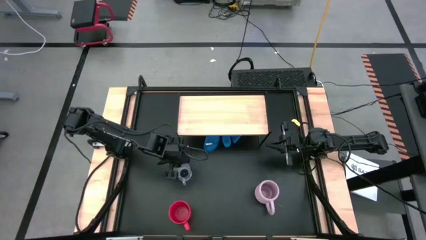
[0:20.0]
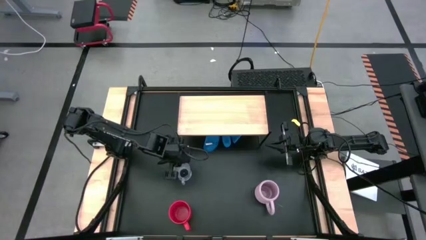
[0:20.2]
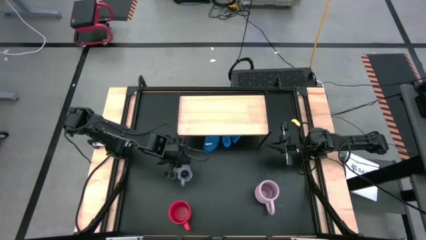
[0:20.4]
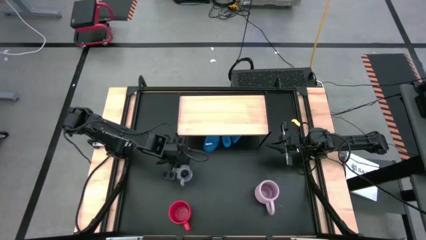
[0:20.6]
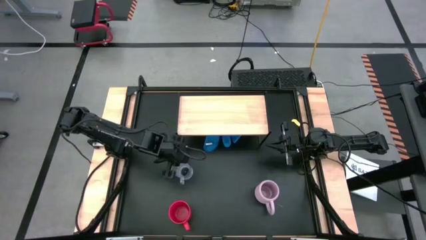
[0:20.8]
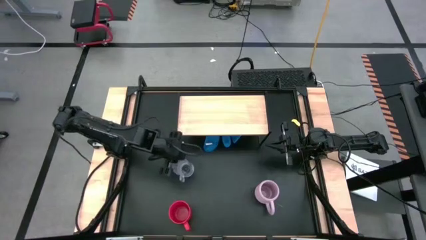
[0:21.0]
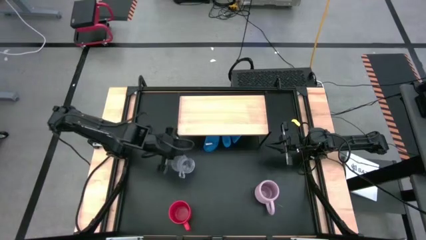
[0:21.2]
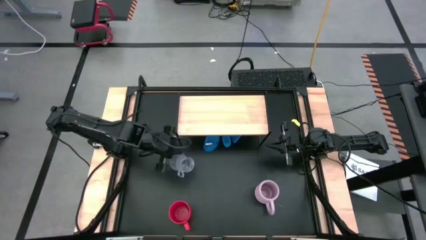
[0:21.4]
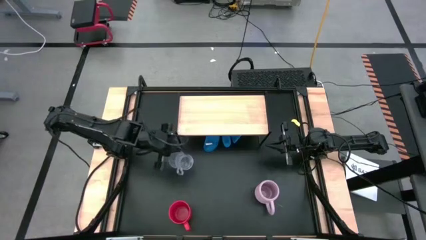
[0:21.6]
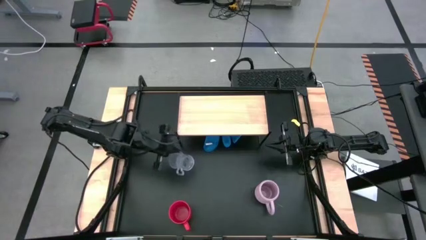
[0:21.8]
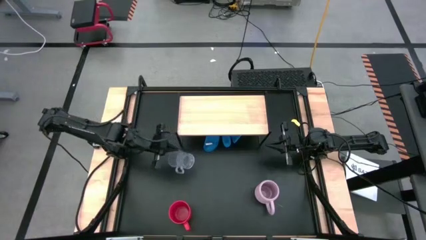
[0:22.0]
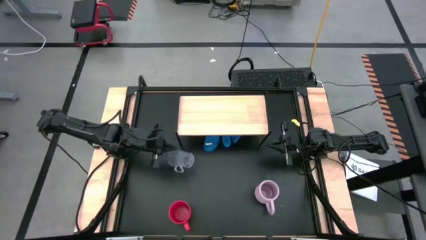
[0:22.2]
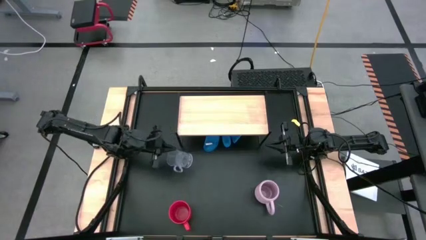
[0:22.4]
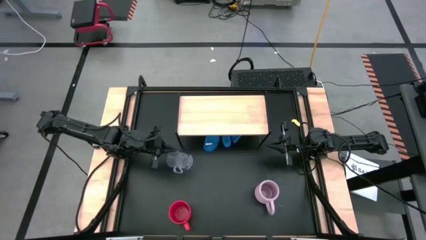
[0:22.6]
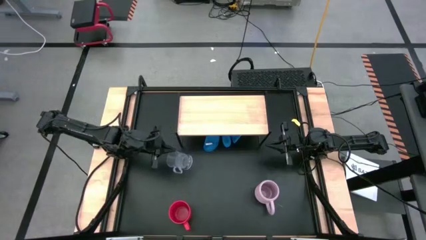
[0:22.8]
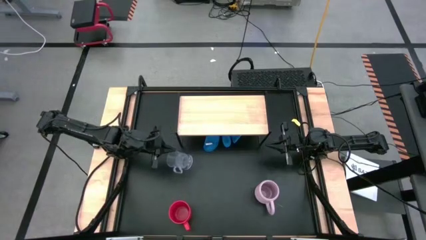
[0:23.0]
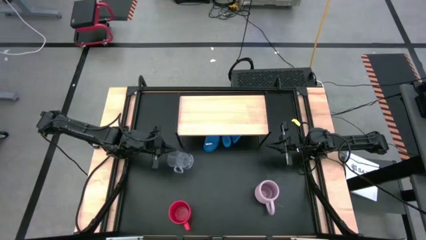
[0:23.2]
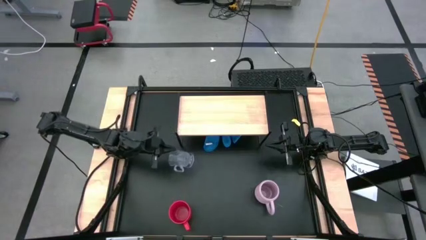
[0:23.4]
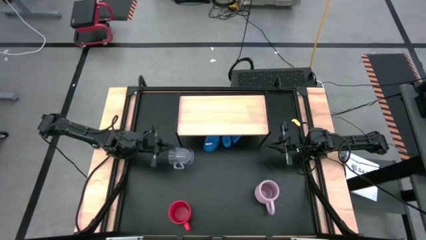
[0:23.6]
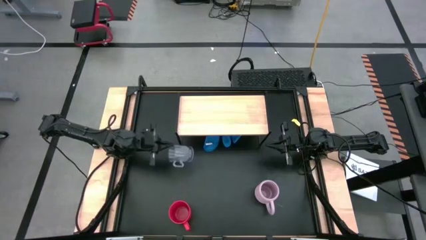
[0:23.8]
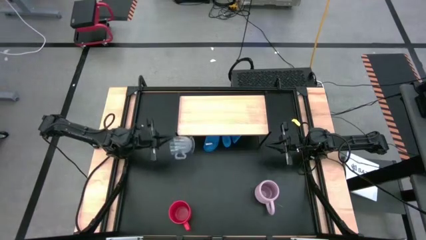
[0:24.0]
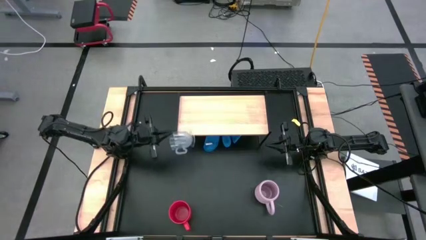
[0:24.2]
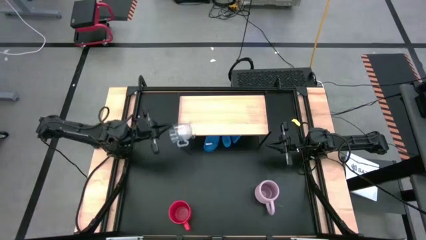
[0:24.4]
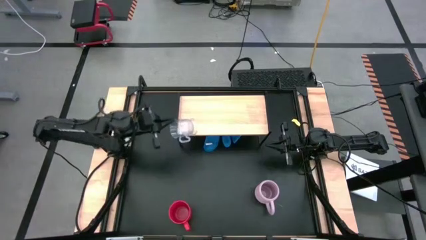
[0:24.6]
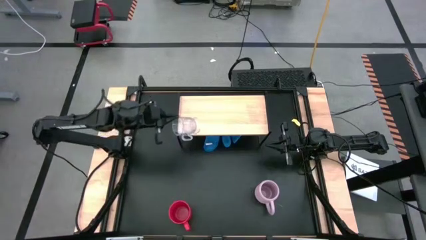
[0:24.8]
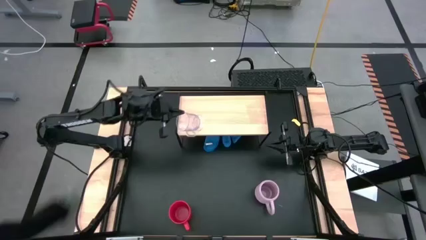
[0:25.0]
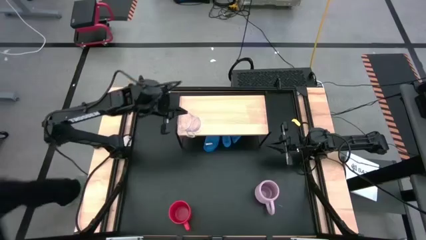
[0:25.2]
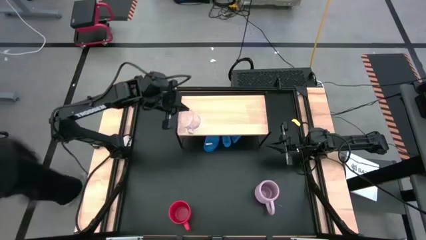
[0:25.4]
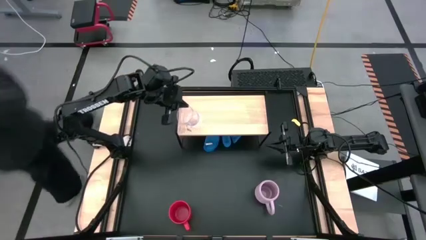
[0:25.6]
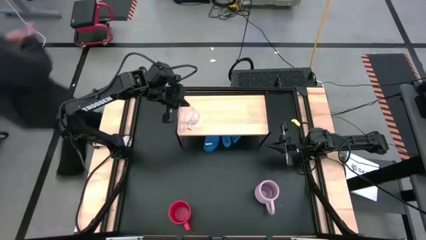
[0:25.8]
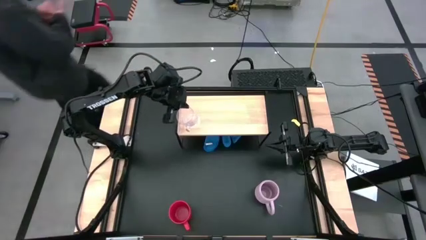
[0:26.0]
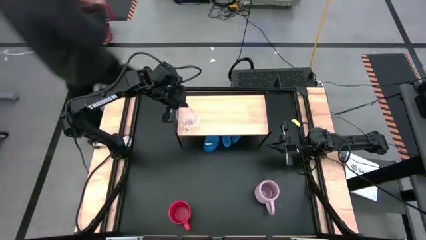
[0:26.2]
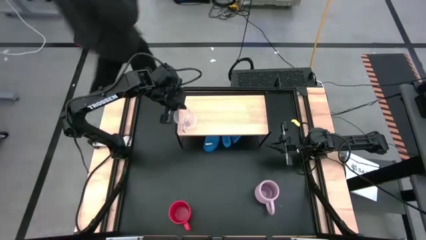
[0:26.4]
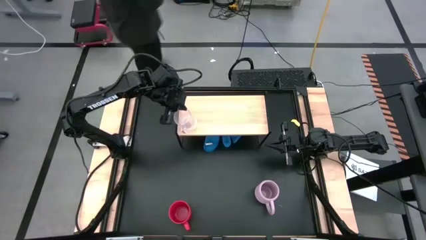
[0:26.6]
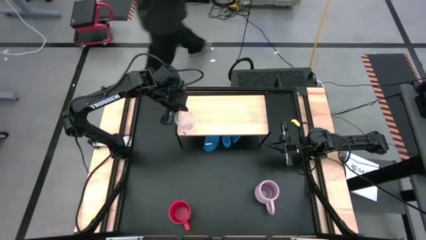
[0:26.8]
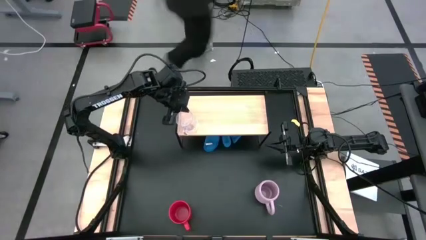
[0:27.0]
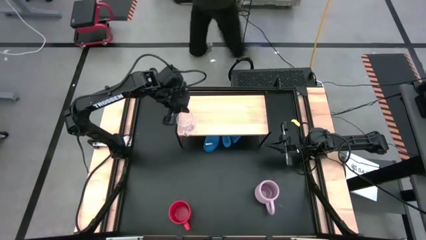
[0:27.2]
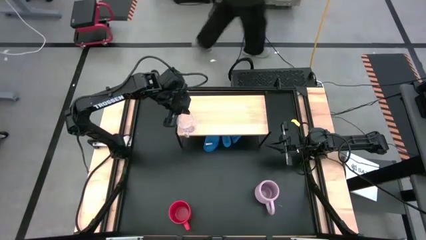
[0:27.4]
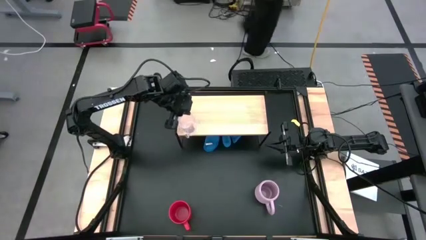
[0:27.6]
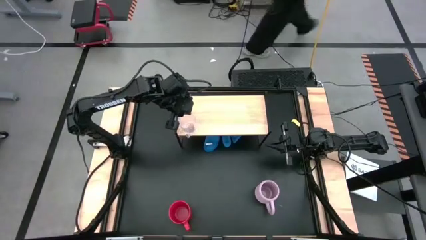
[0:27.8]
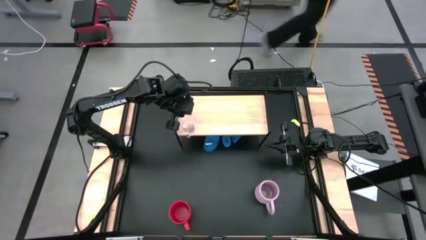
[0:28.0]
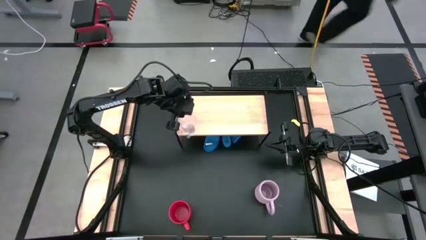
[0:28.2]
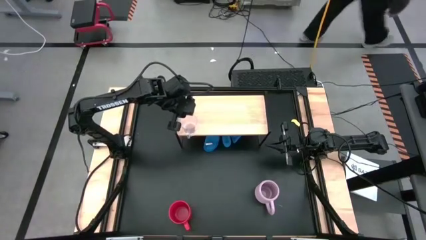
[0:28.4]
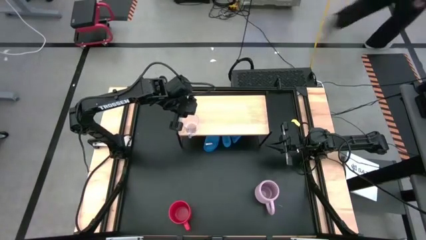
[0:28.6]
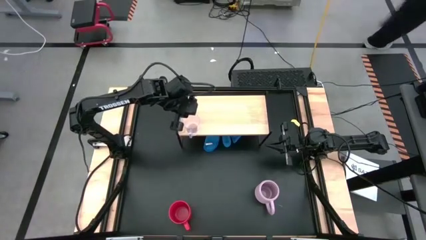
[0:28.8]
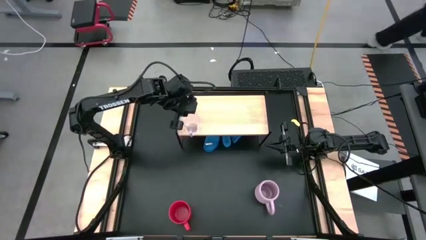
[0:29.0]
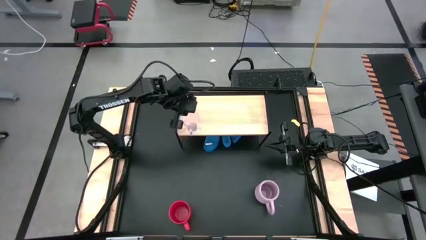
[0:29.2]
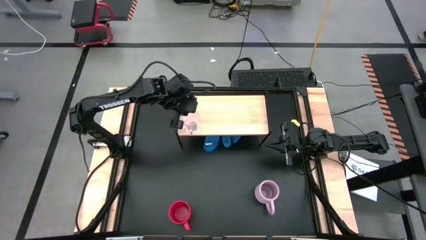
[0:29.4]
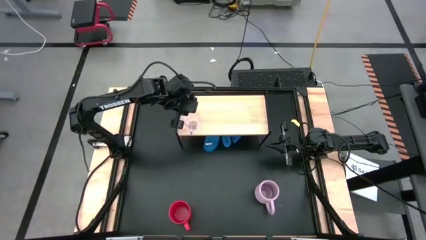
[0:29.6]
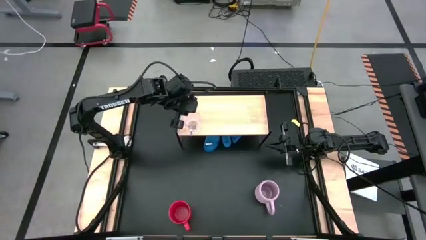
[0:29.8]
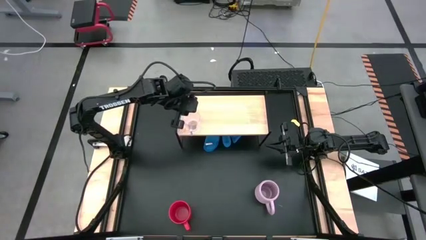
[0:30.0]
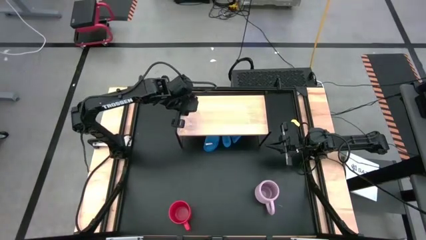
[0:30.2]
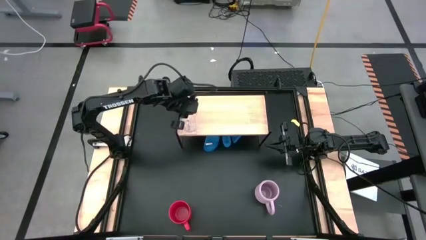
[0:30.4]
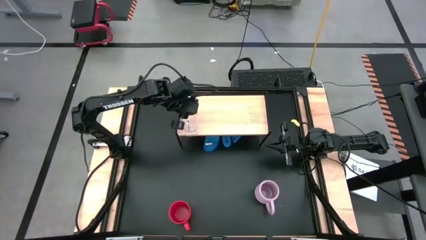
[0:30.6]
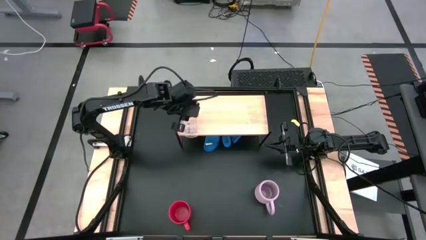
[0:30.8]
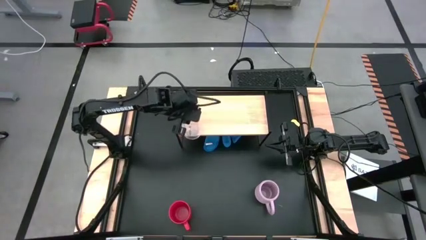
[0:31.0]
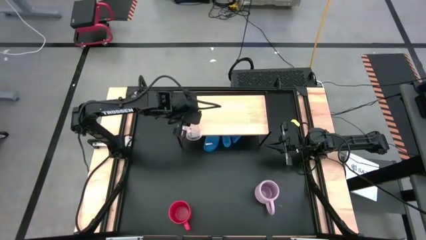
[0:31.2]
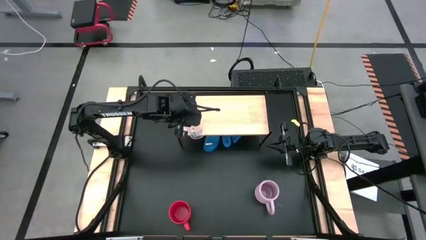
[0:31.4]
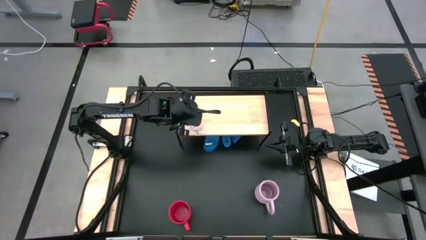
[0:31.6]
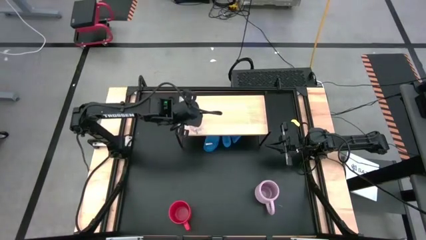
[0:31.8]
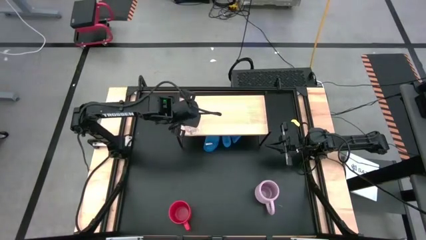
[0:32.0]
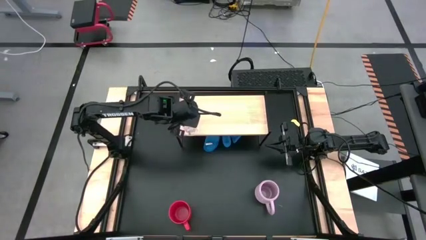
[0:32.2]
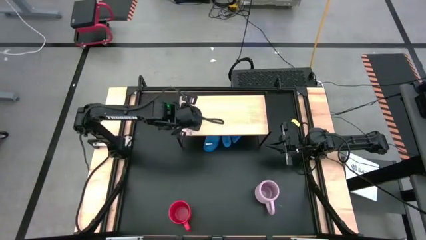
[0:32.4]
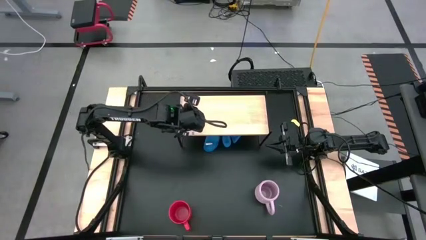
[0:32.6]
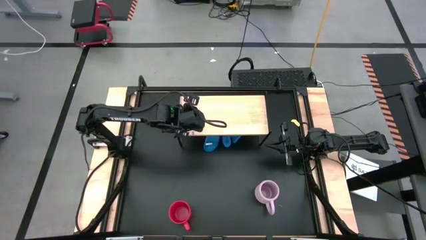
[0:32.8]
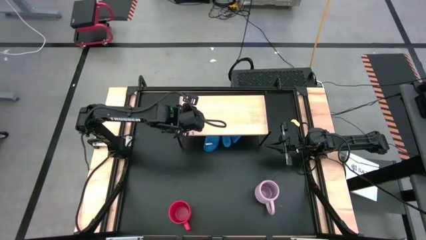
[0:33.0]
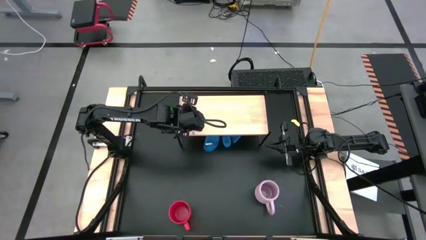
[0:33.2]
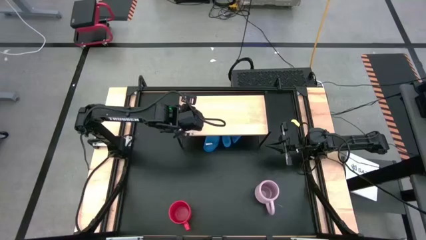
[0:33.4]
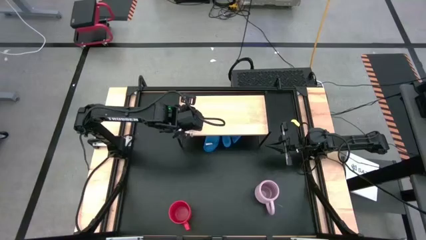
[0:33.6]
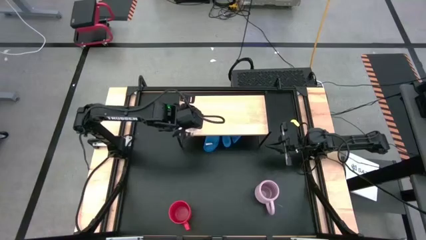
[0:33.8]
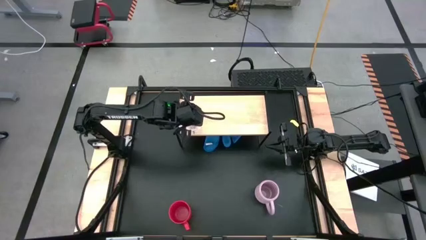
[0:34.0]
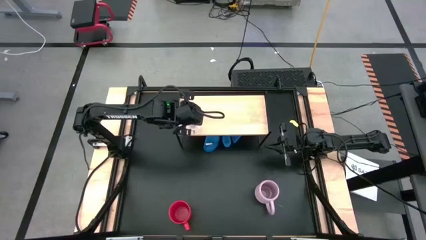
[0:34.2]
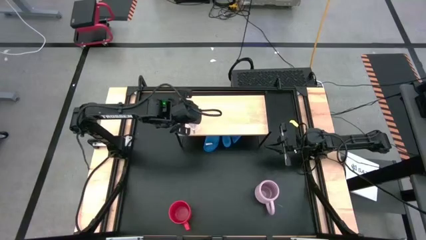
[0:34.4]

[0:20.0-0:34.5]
Task: Stack small to large cups/mugs on shelf
Put the transparent mug on the shelf
